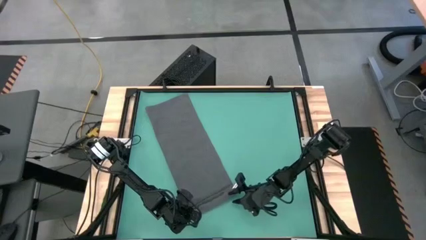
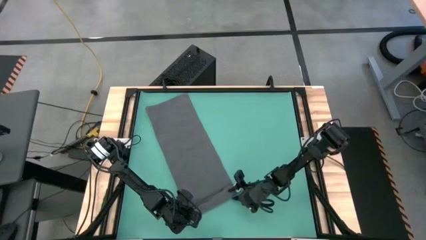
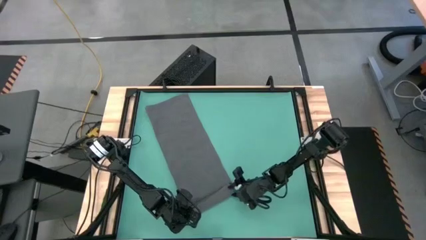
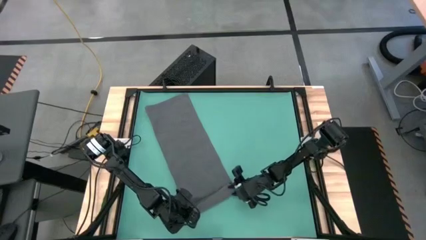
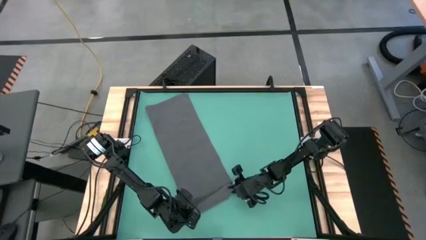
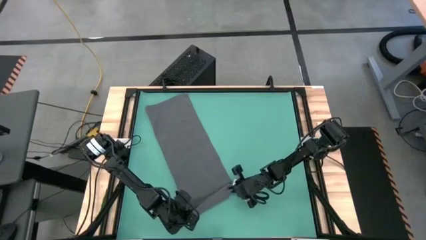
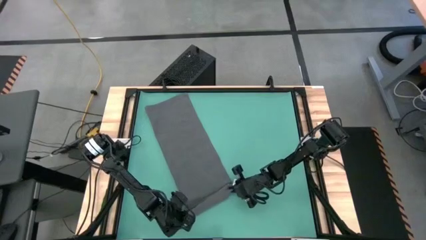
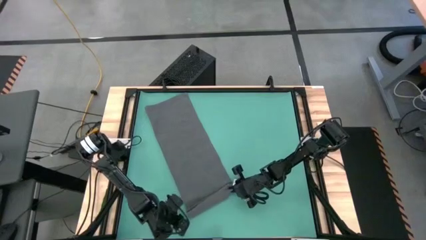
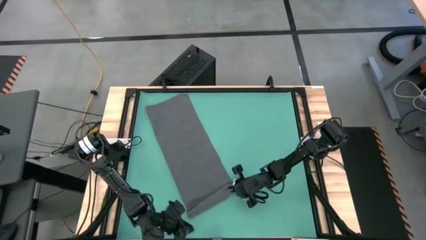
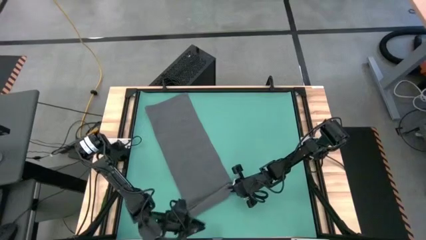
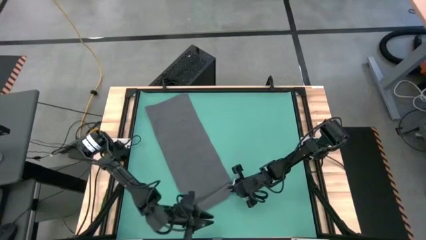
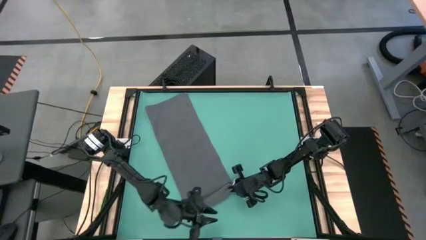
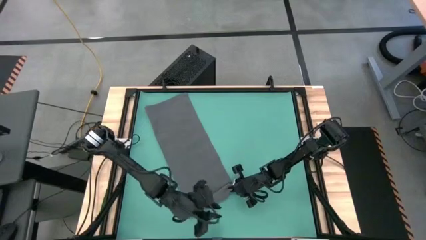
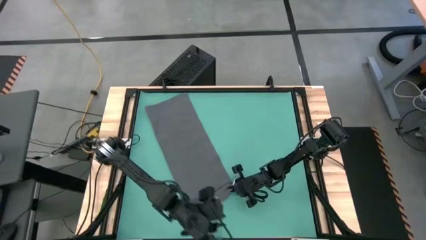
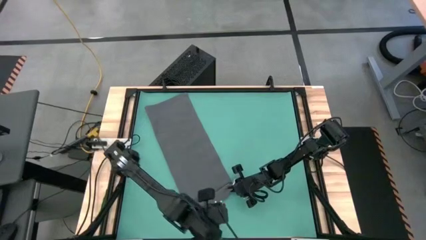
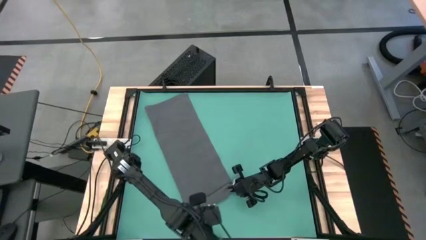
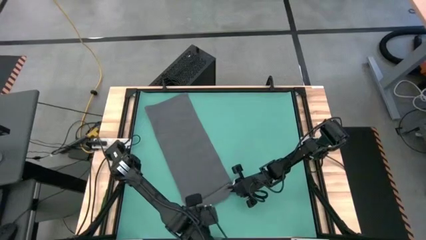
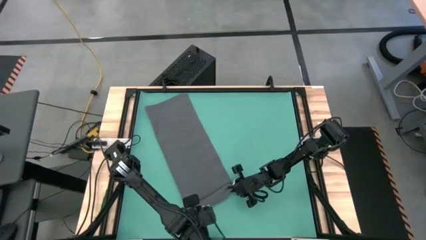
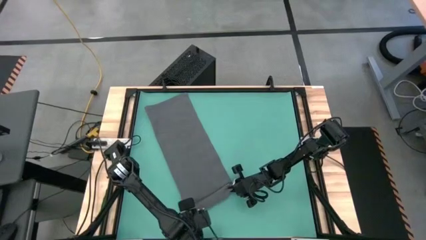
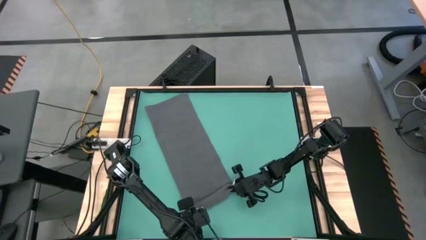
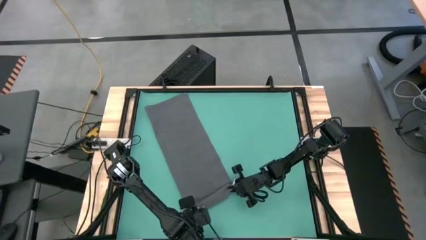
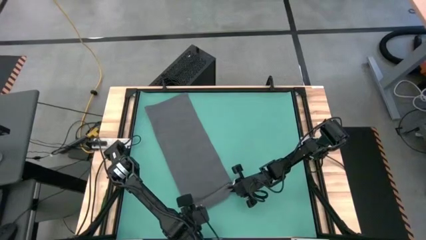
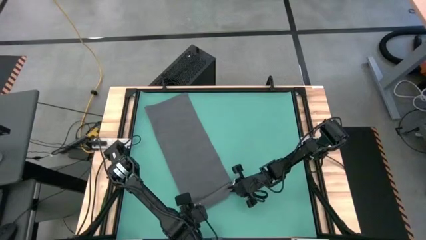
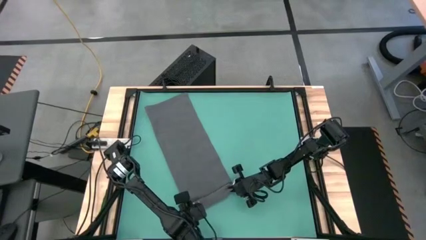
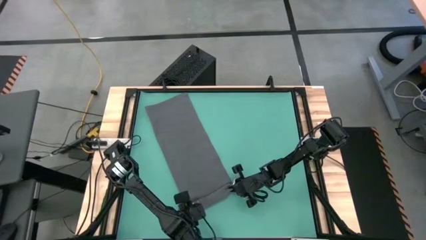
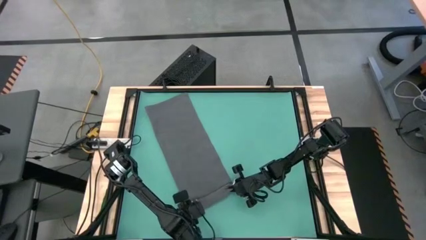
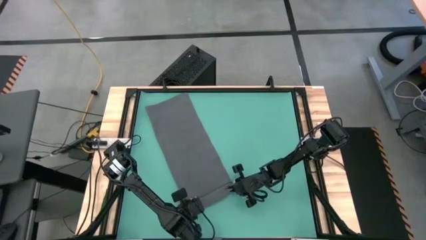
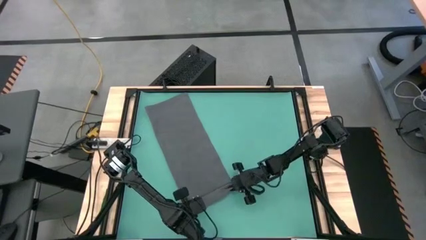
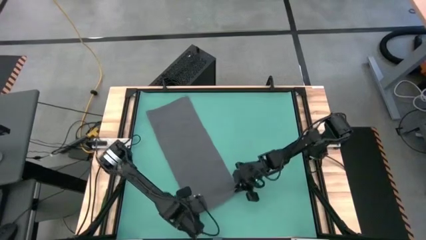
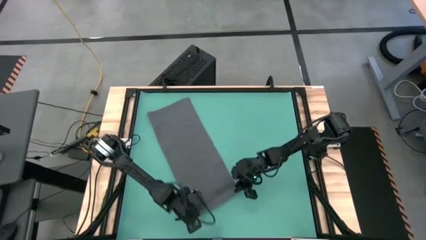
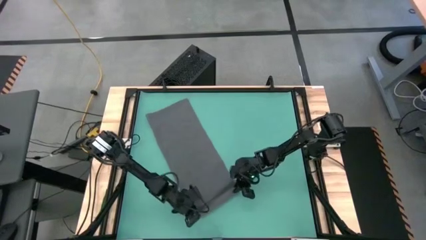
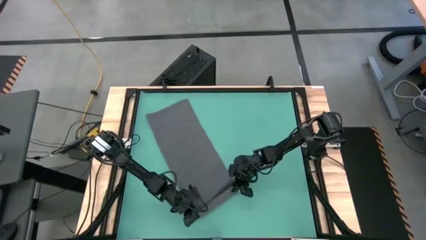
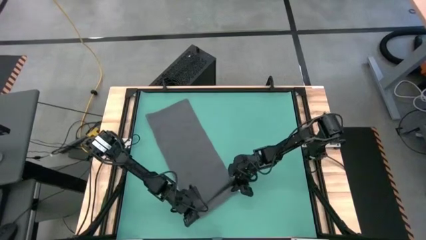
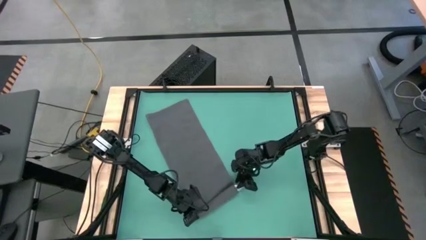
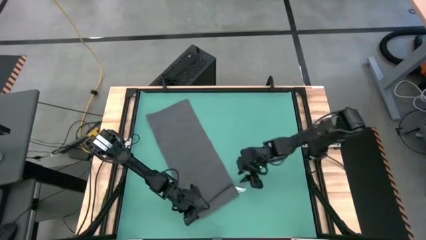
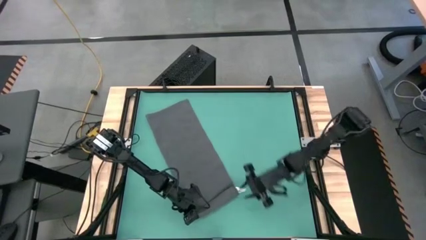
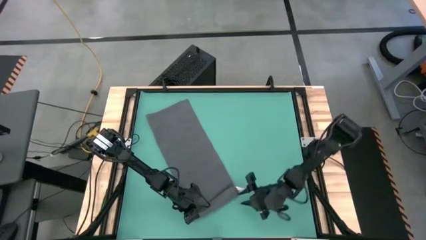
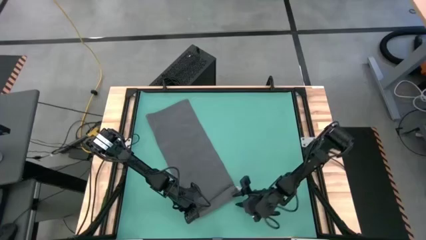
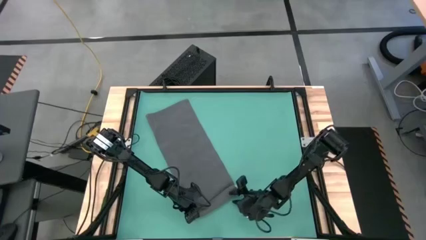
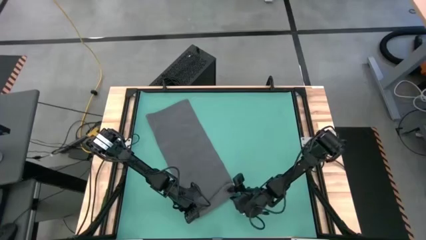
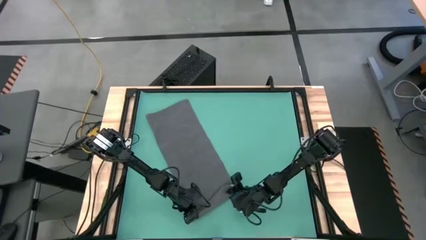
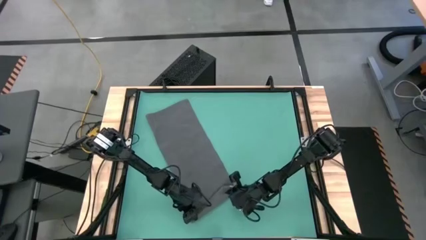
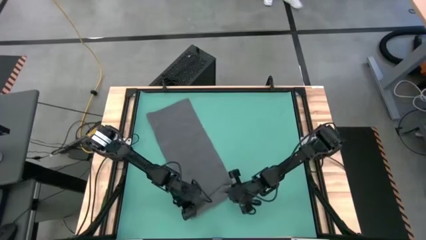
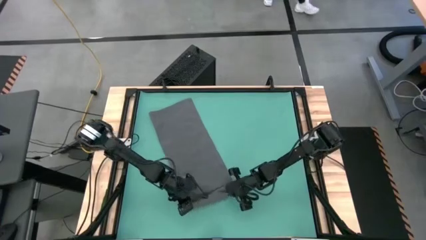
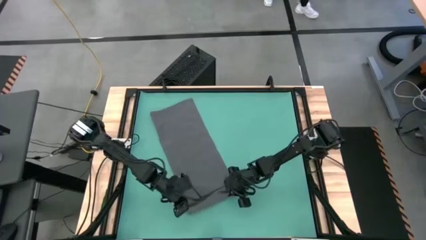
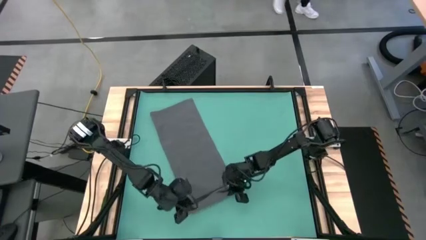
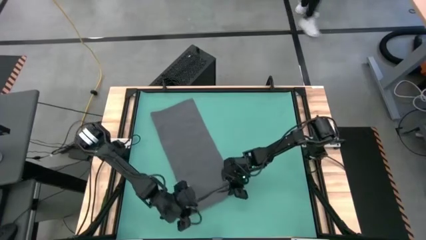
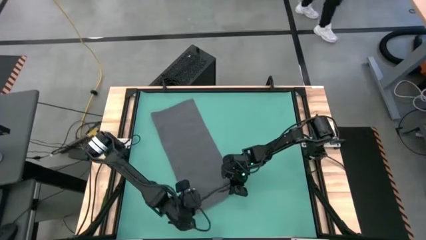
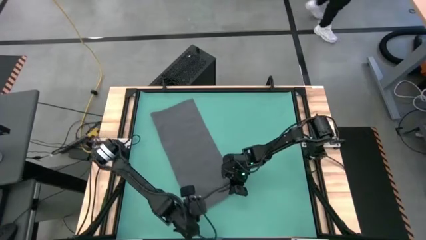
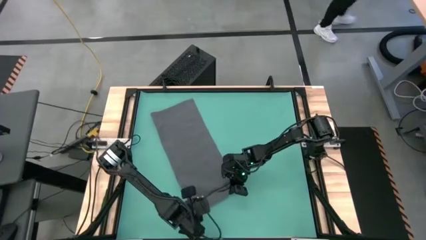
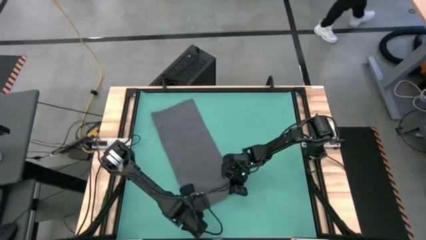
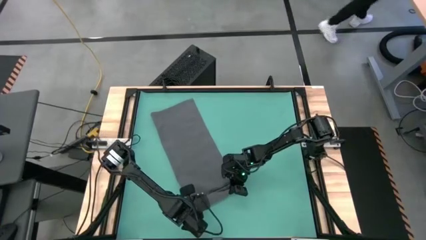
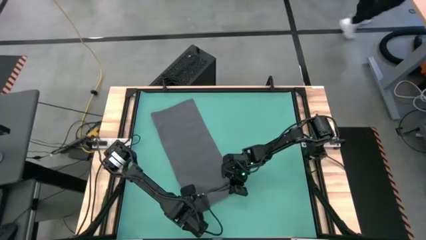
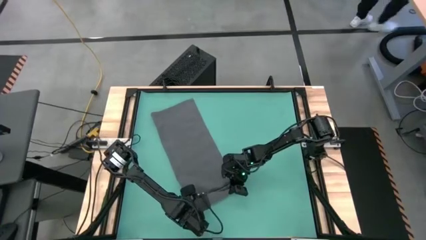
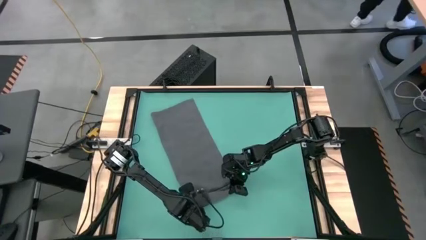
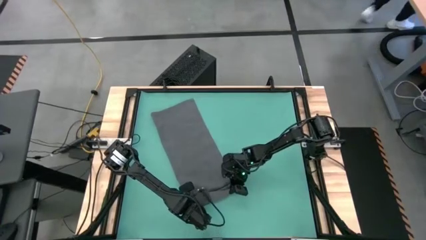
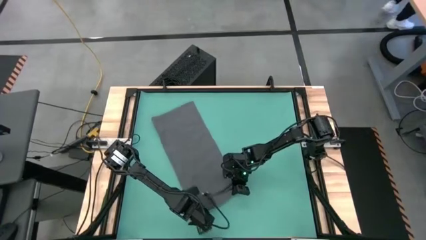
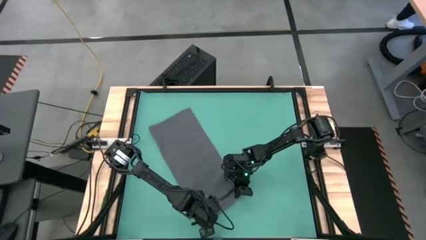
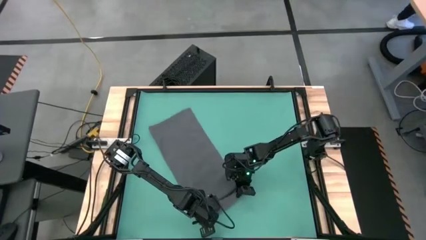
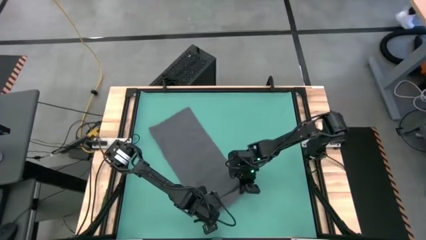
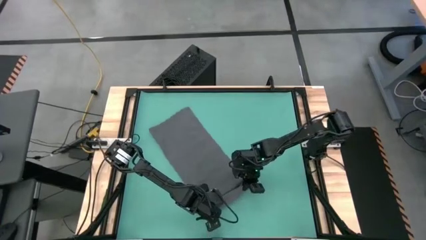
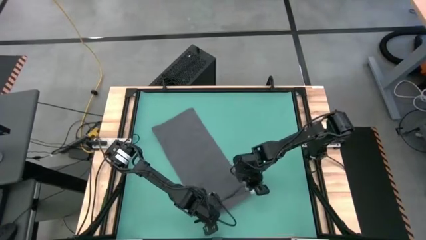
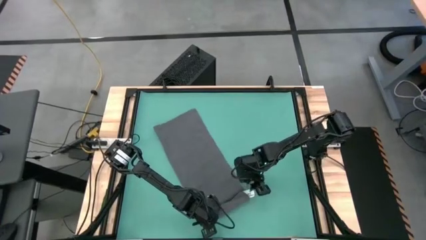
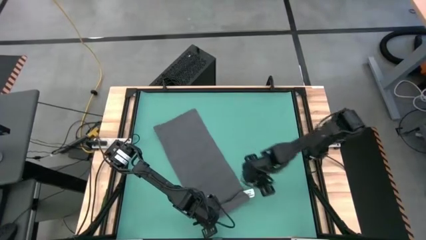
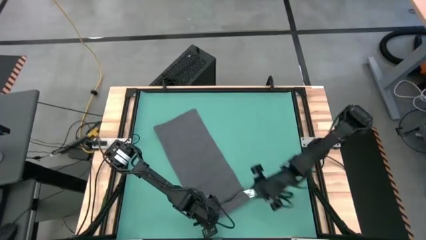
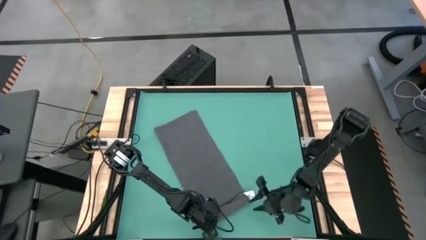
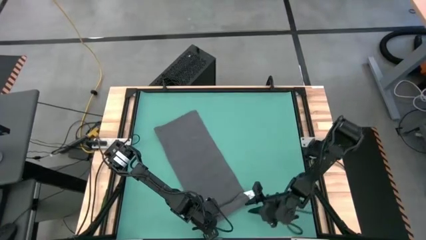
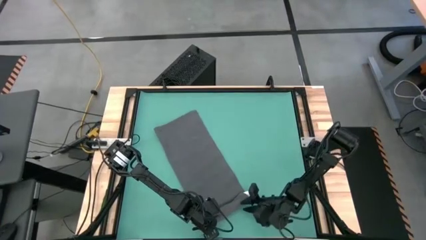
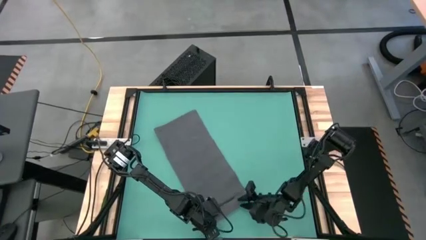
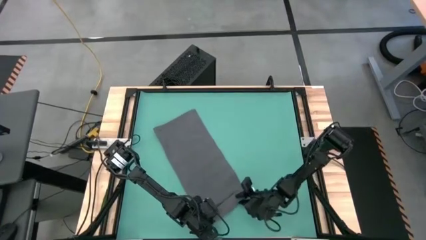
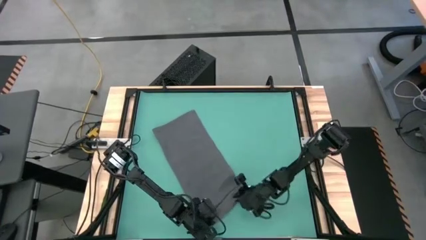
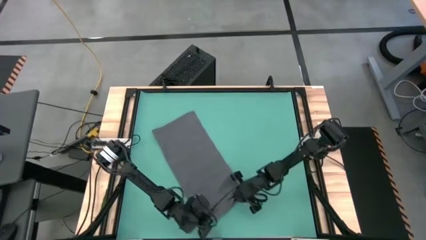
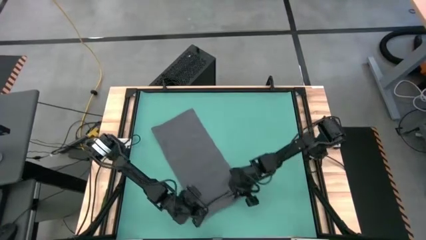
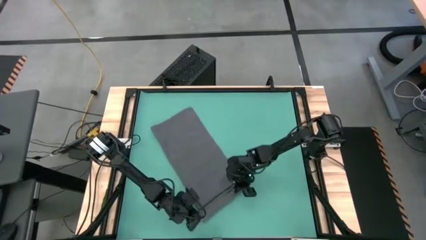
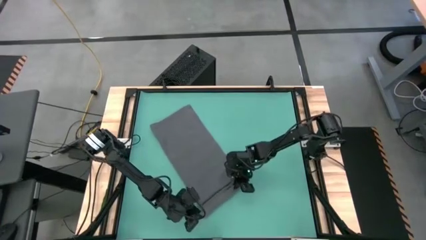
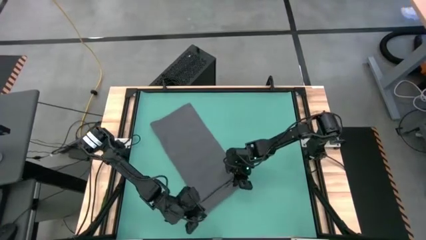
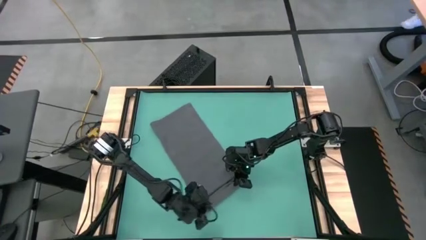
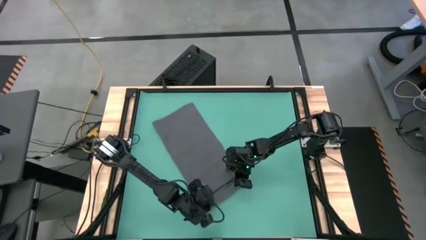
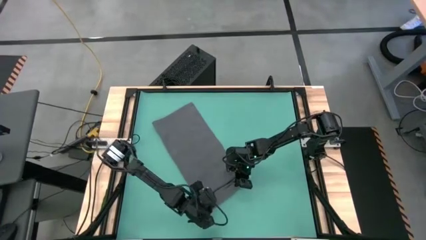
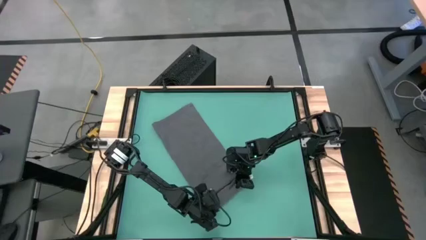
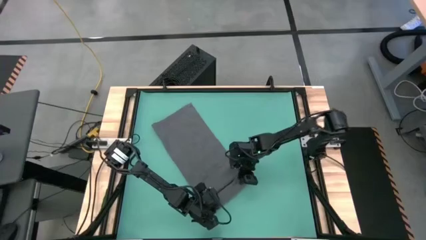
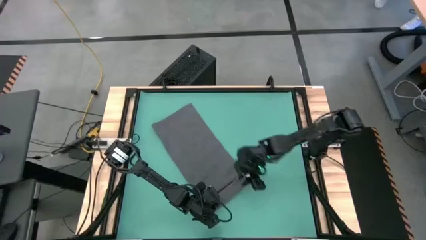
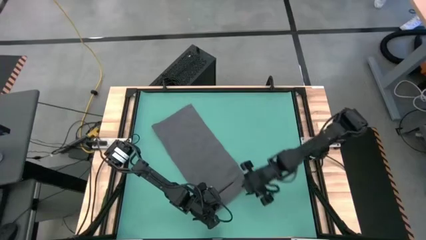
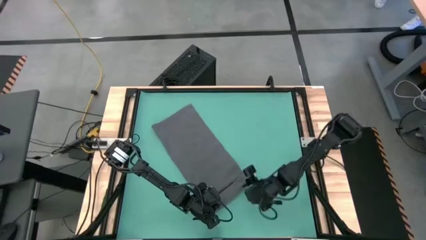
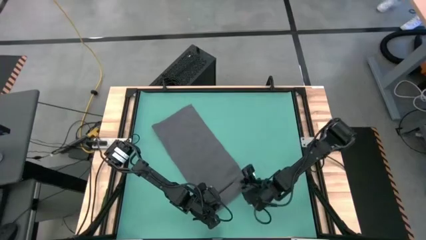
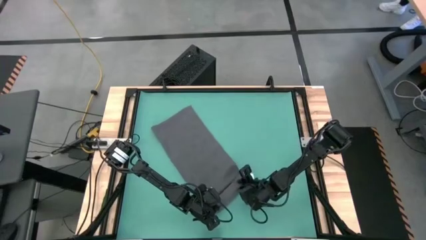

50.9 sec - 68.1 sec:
Task: Roll towel into tight, uniform cylinder
Roll the gray towel
